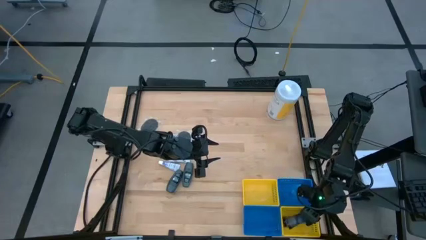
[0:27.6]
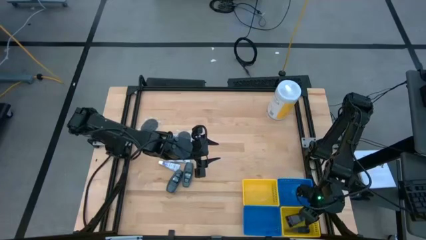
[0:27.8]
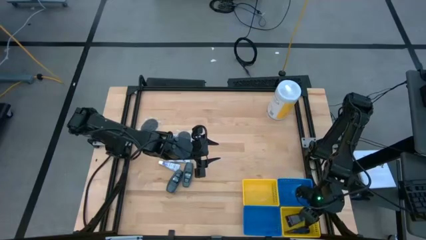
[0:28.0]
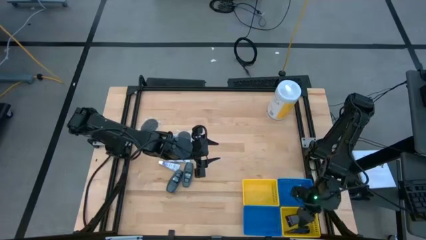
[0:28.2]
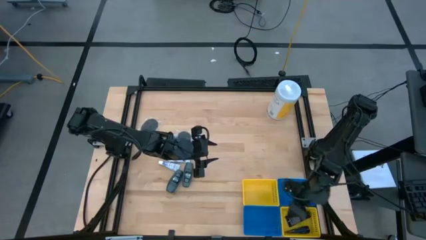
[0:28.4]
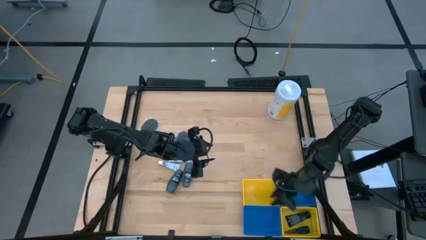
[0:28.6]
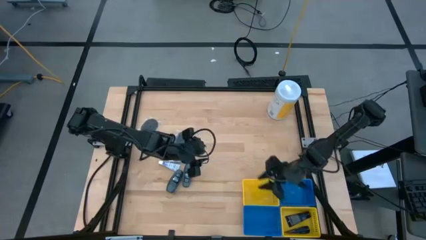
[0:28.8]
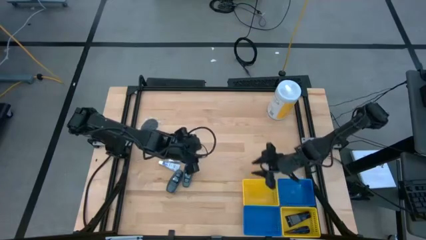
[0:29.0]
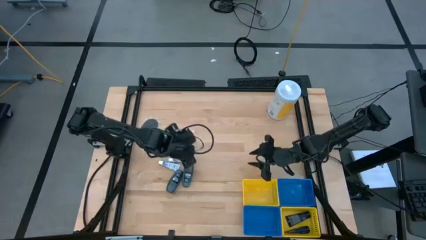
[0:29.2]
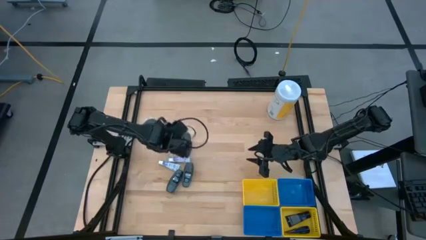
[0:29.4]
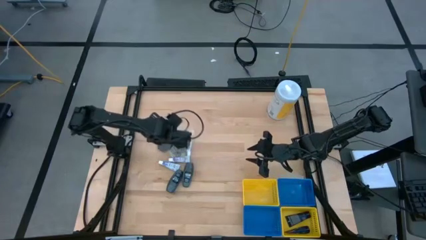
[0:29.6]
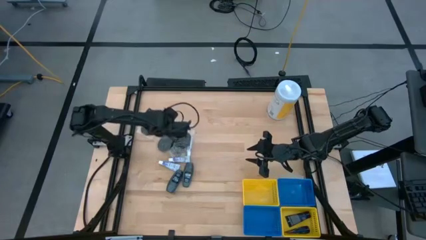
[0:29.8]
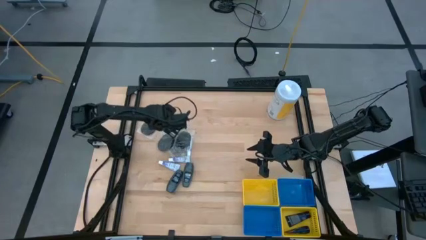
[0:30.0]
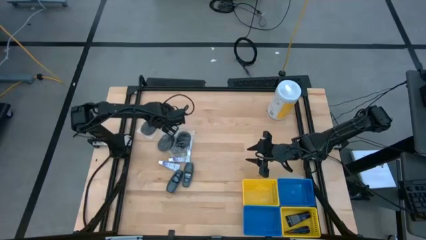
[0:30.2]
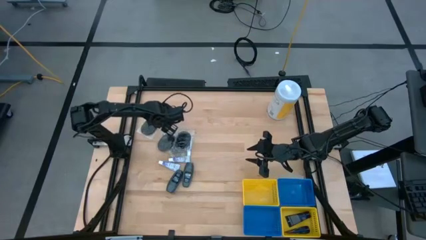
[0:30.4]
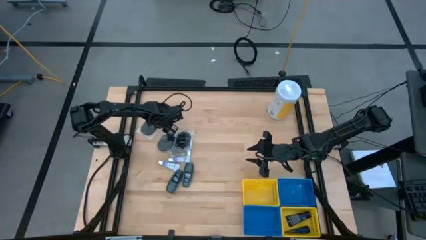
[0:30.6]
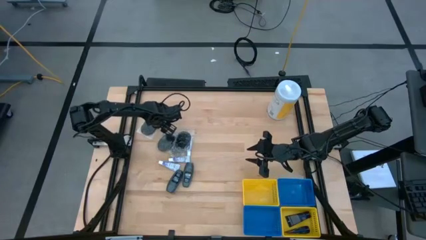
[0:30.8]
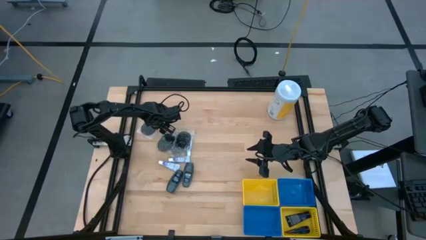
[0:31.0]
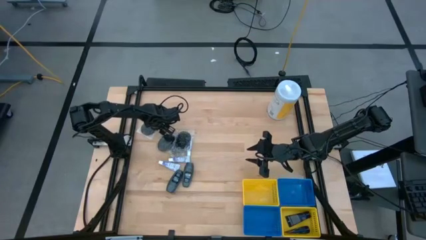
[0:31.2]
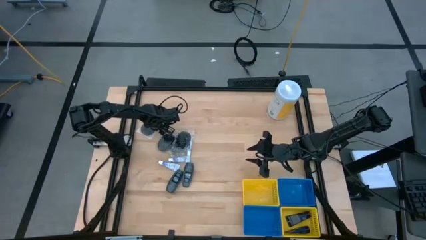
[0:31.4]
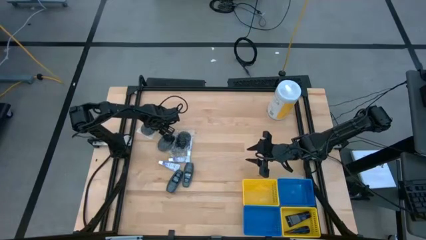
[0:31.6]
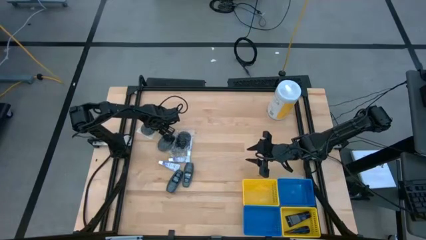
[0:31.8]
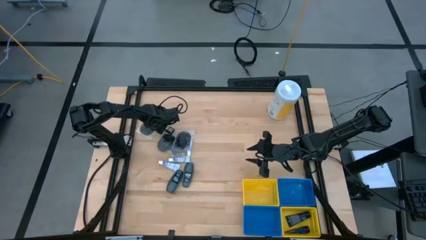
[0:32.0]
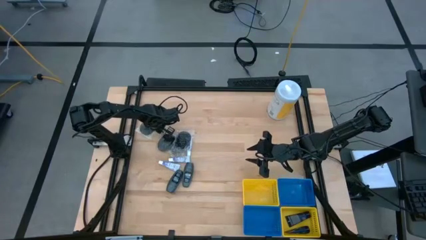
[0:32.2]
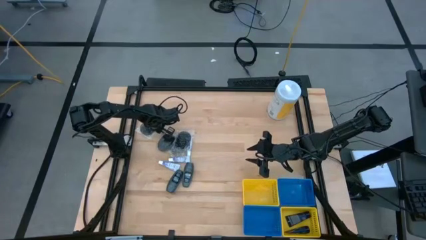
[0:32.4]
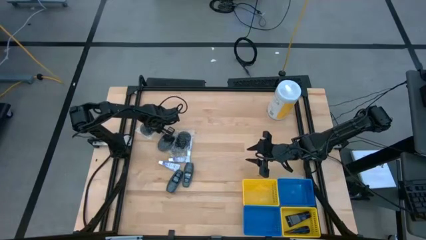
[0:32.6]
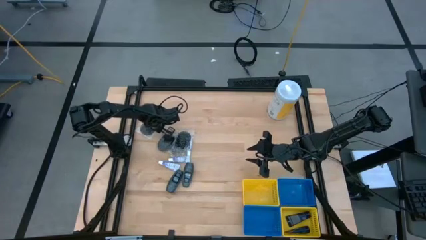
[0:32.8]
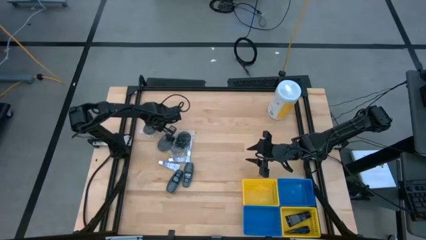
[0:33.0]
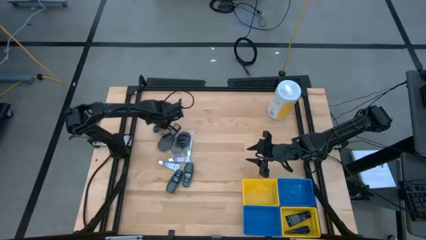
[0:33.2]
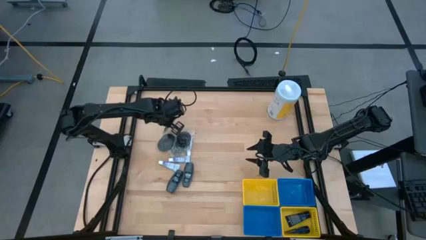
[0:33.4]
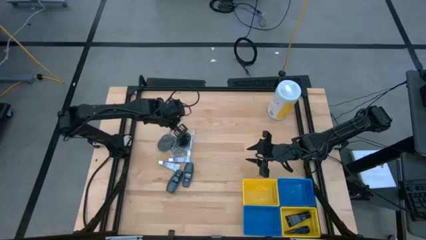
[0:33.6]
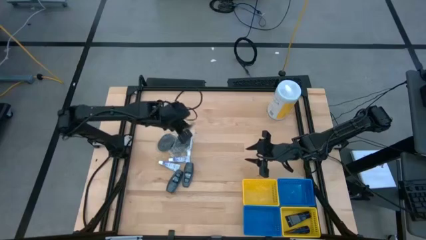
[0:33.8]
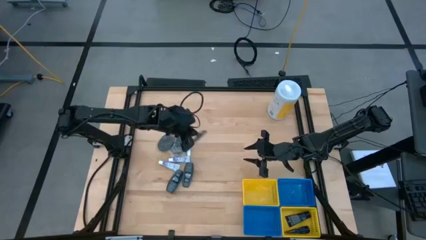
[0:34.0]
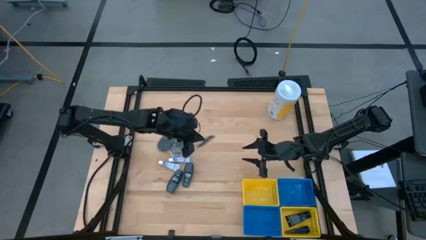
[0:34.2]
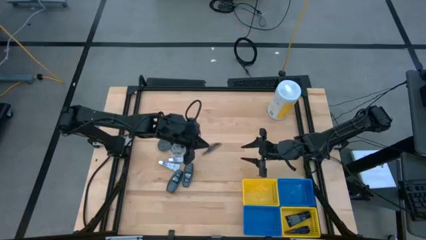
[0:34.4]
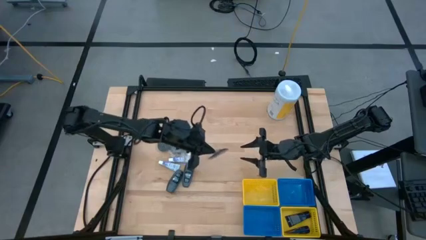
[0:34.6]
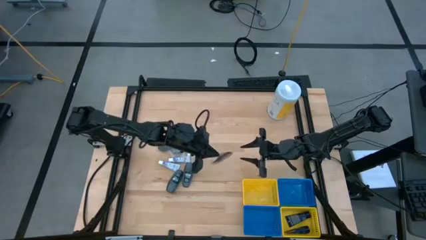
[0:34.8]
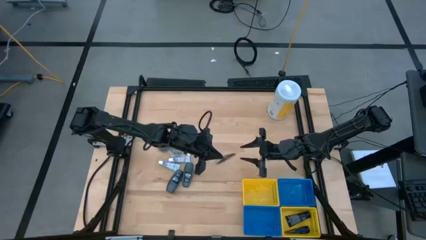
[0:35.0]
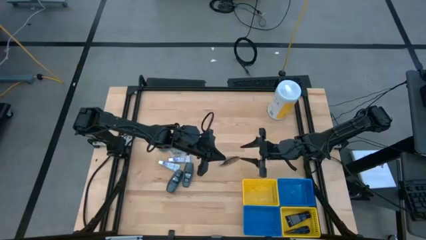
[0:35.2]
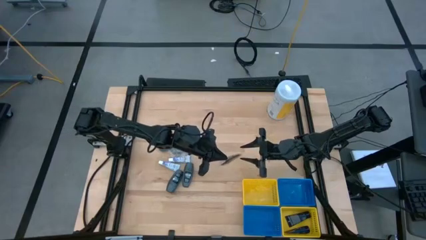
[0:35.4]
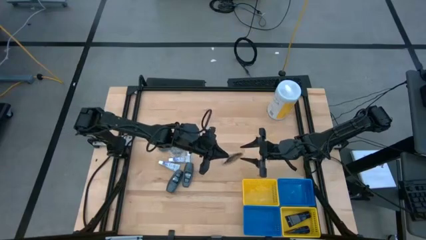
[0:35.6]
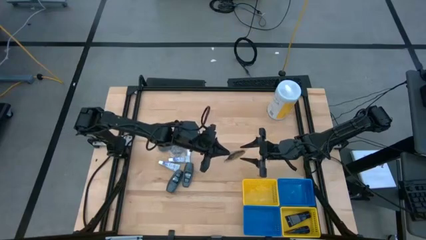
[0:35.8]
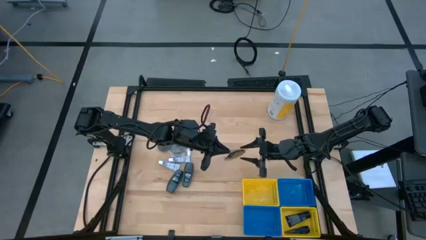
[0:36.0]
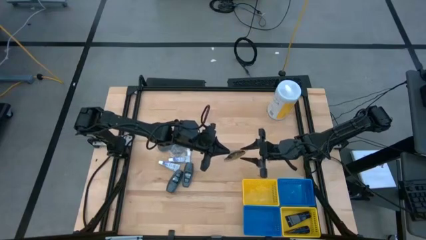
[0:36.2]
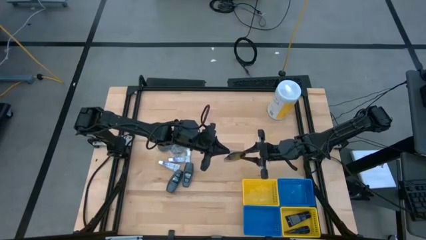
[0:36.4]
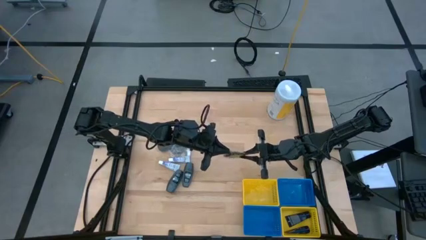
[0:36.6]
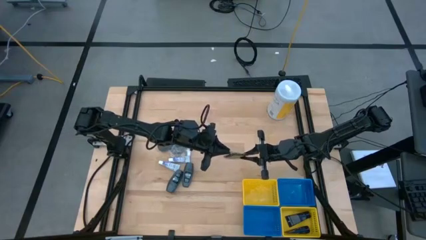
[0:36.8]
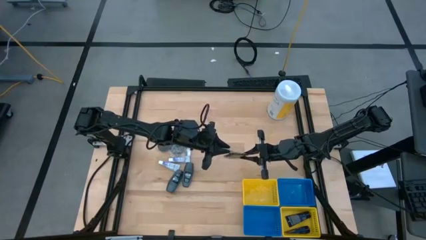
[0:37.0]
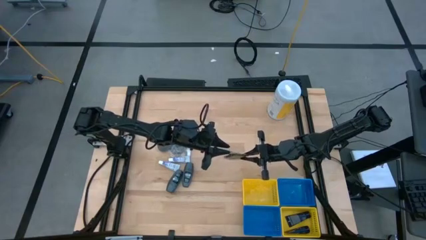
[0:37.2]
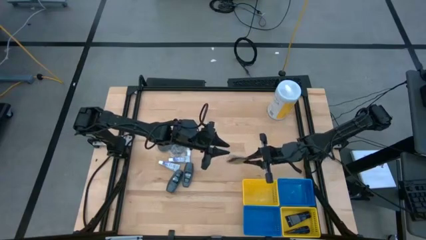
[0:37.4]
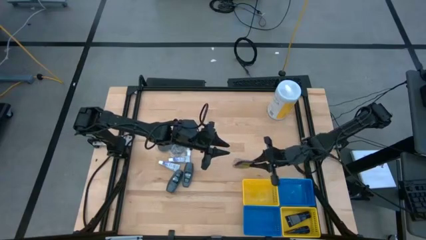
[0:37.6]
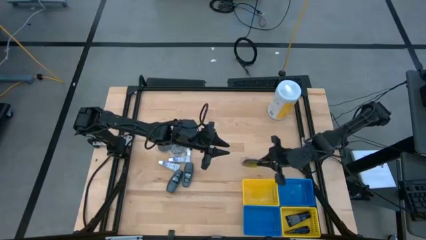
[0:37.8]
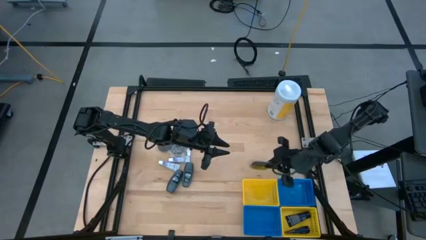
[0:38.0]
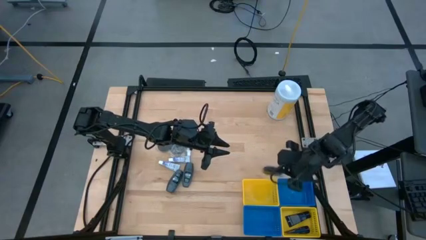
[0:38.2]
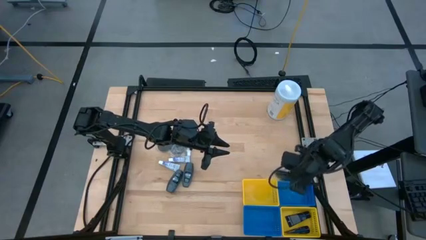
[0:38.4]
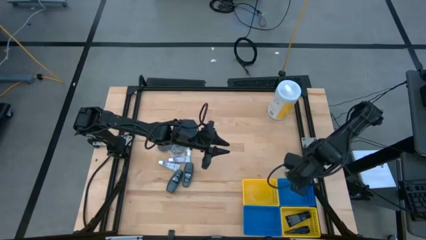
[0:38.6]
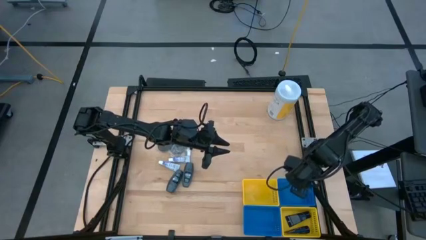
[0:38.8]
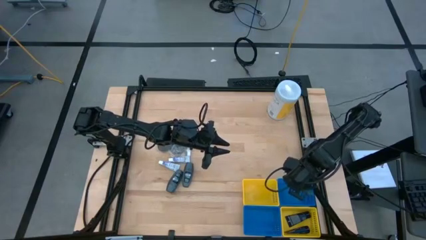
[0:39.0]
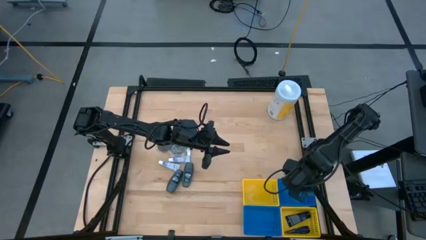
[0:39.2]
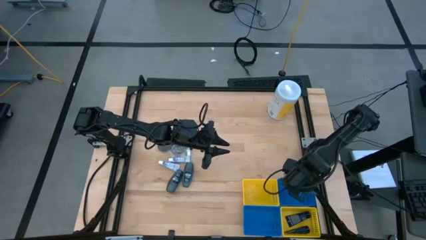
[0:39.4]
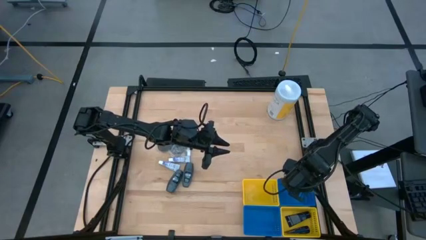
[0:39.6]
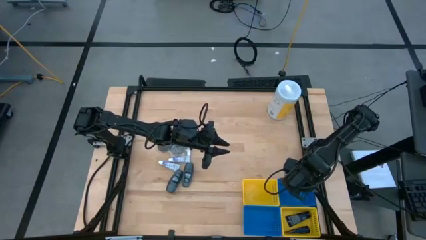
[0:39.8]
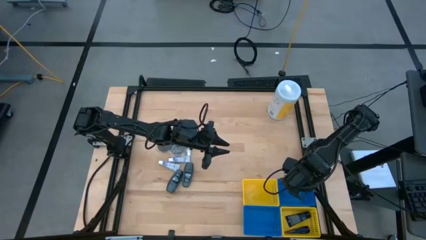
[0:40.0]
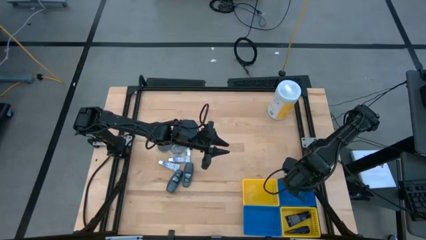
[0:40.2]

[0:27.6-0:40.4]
Task: Pick & Place Travel size toiletries
Put the black hairbrush into the top blue bin

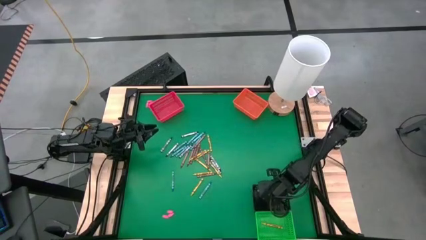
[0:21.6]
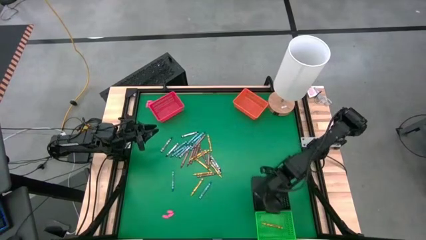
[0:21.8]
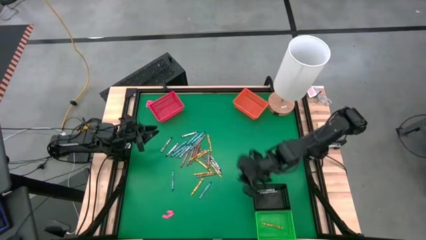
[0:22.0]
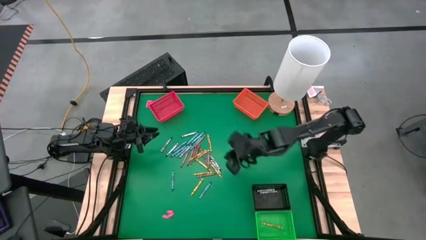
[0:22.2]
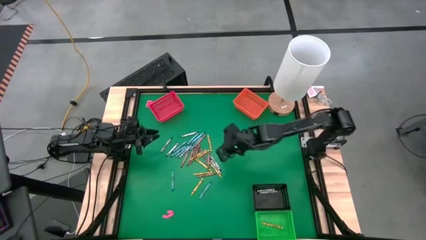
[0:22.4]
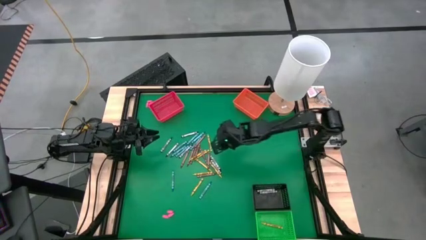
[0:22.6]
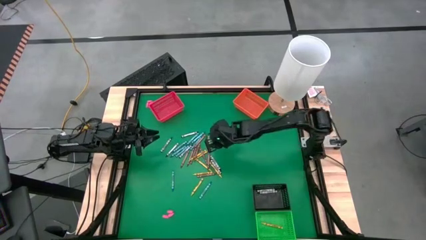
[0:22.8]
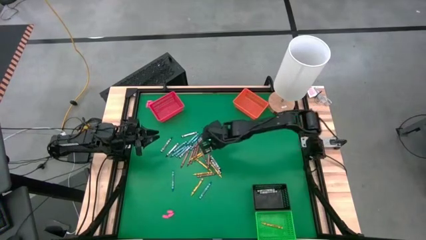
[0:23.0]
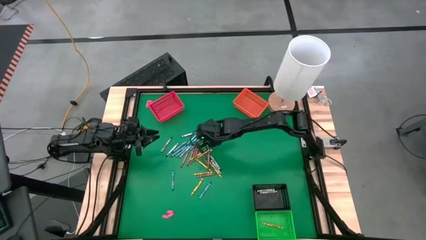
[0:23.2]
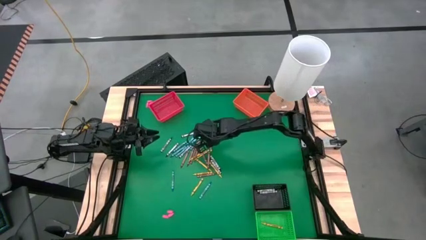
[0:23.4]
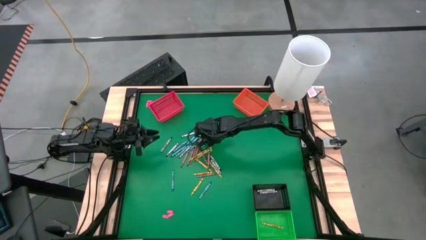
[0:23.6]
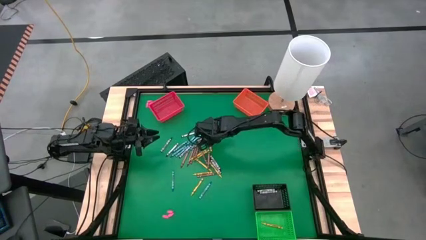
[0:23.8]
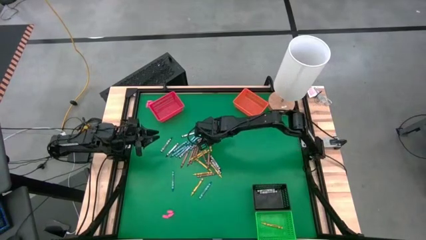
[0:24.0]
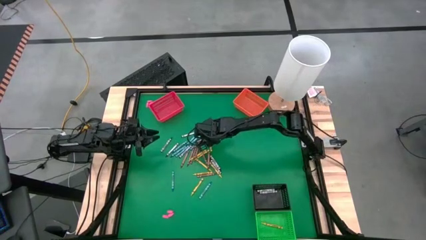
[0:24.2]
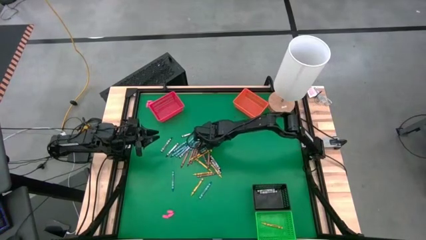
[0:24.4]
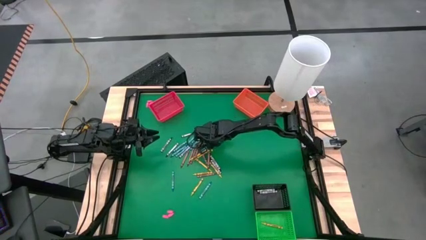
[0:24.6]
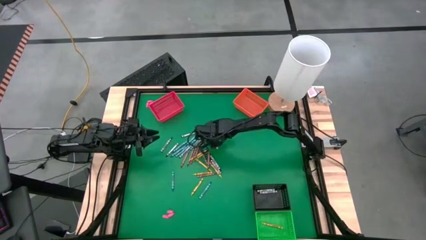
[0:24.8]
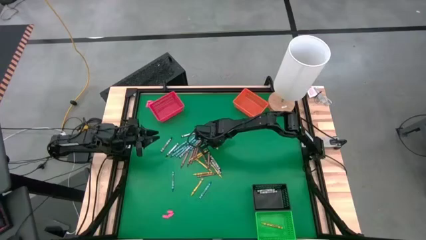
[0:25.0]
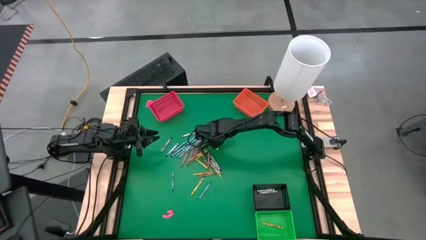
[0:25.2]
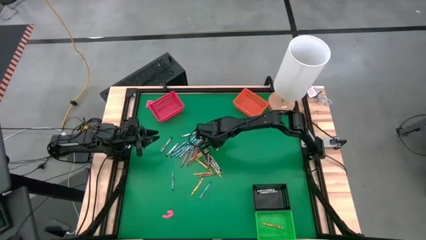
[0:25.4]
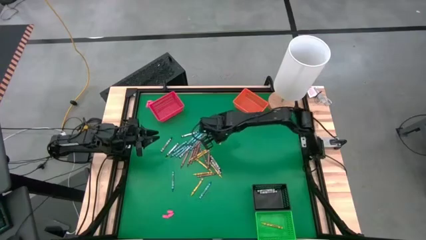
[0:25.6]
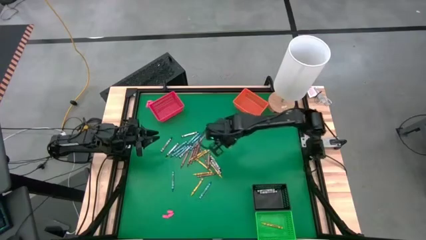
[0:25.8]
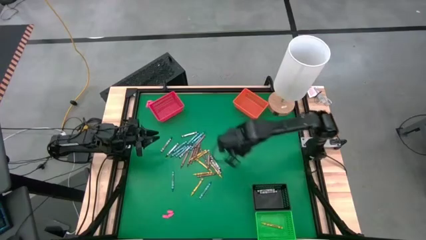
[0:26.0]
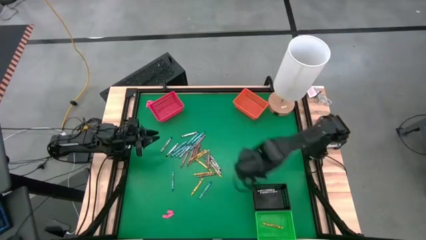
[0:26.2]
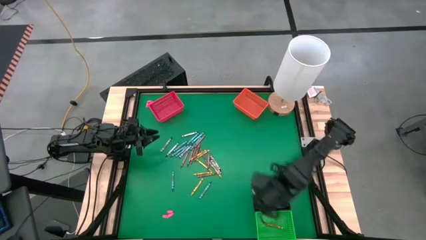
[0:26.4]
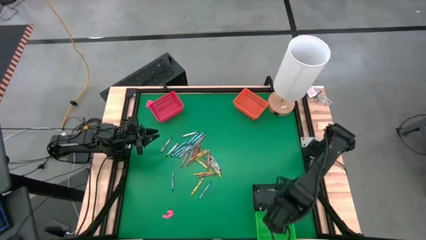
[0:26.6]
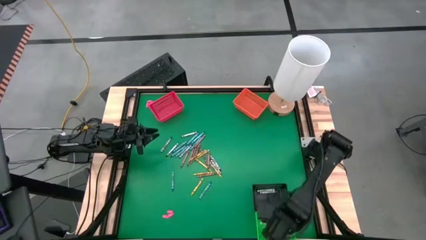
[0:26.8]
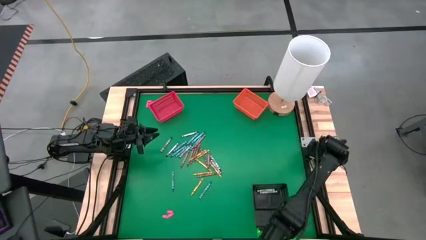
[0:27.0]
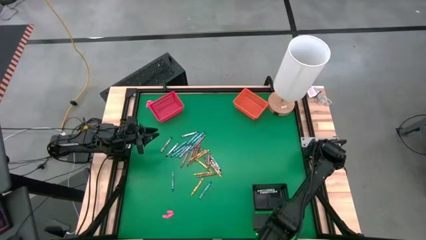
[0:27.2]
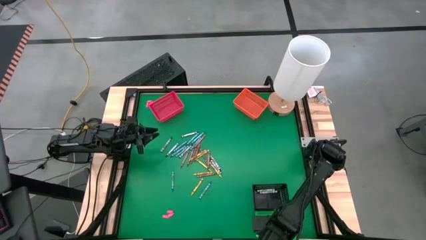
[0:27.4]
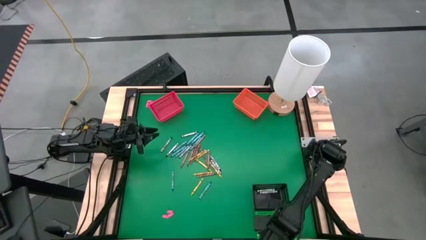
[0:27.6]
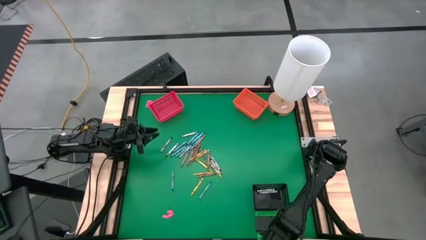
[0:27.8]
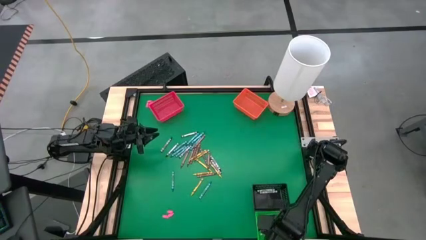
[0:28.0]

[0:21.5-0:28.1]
Task: Sort crayons
Put the yellow crayon into the green bin
